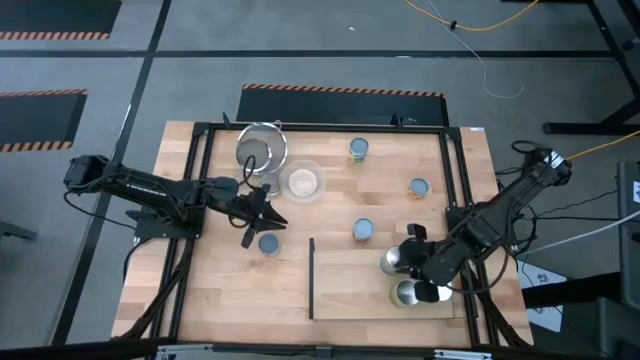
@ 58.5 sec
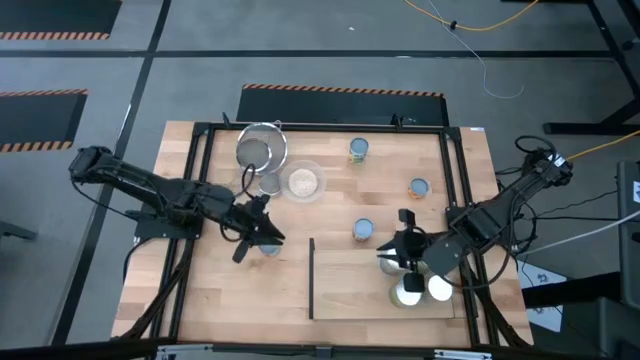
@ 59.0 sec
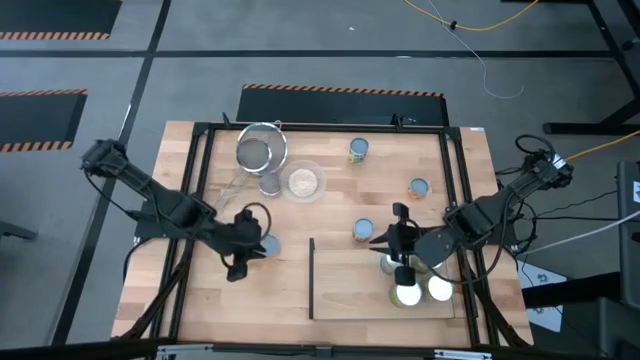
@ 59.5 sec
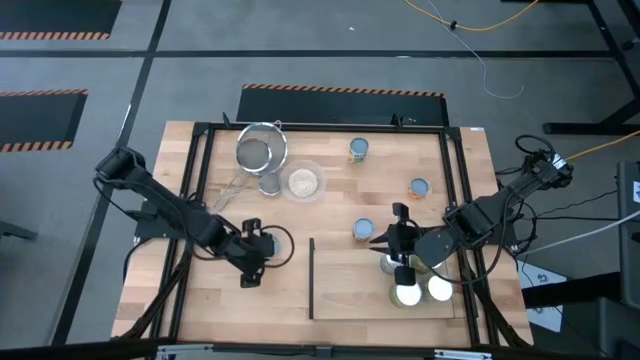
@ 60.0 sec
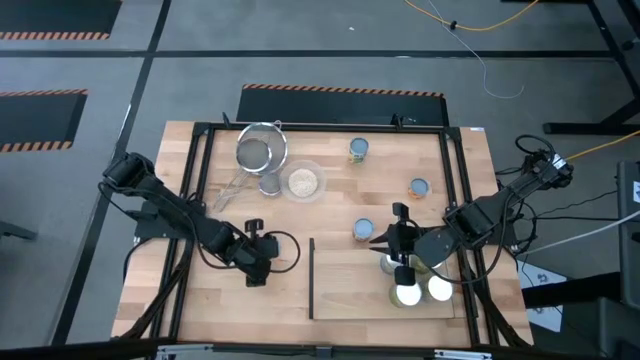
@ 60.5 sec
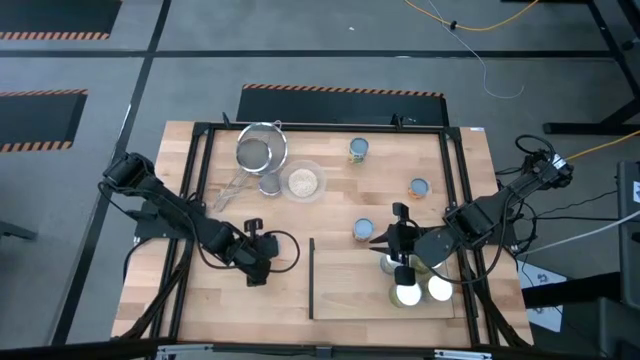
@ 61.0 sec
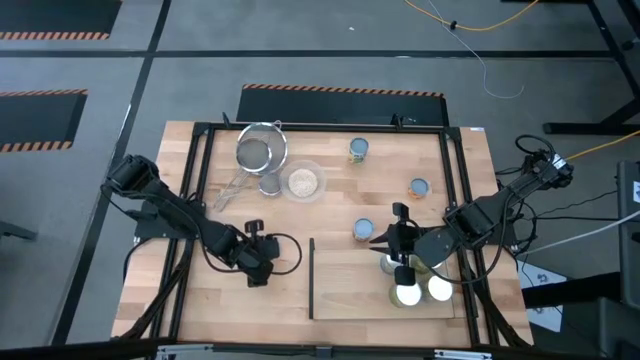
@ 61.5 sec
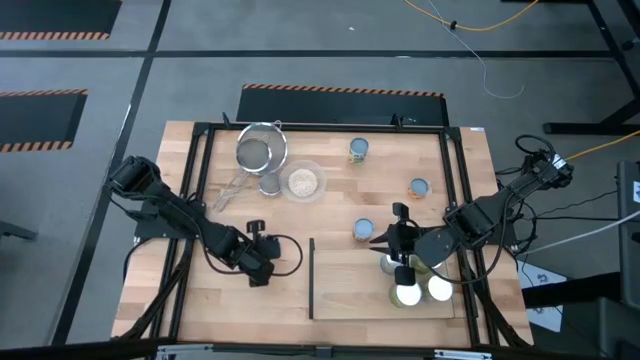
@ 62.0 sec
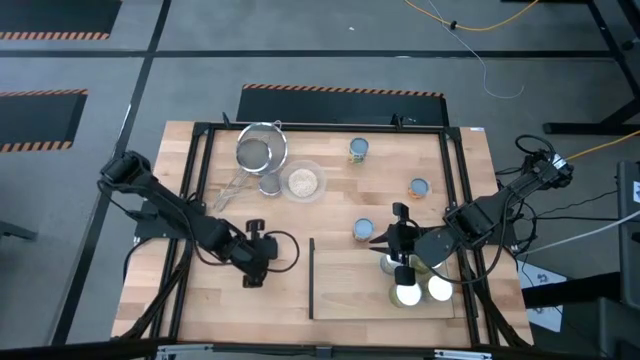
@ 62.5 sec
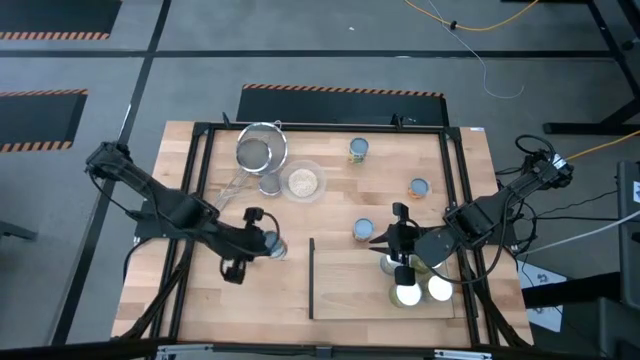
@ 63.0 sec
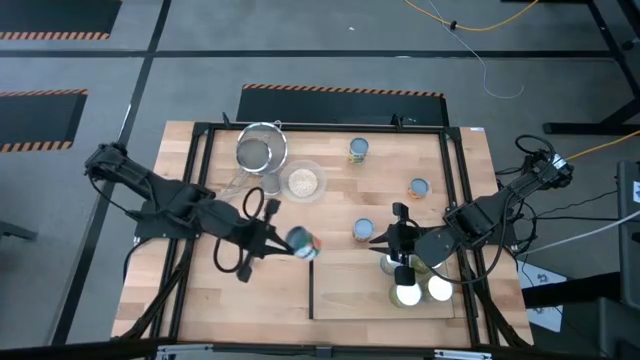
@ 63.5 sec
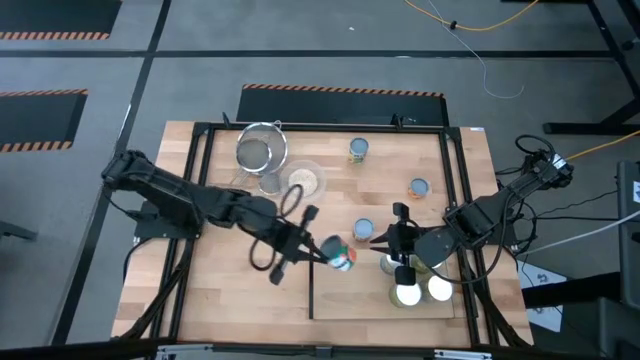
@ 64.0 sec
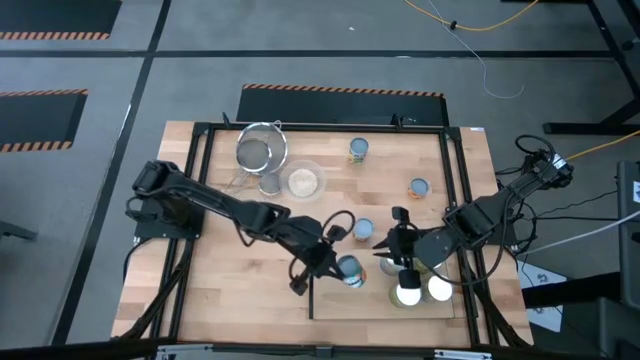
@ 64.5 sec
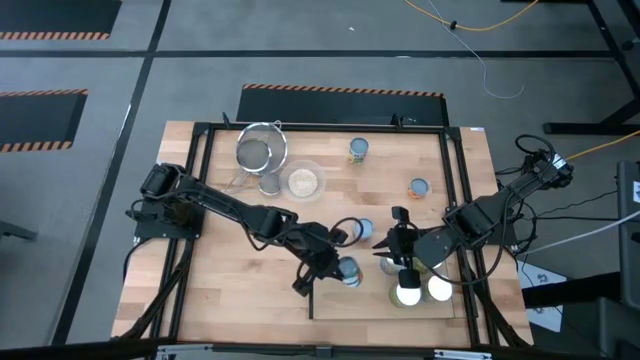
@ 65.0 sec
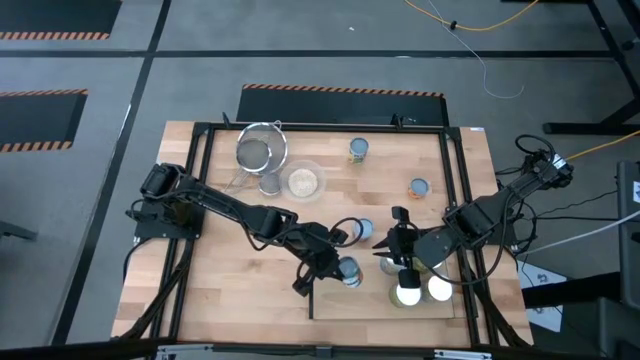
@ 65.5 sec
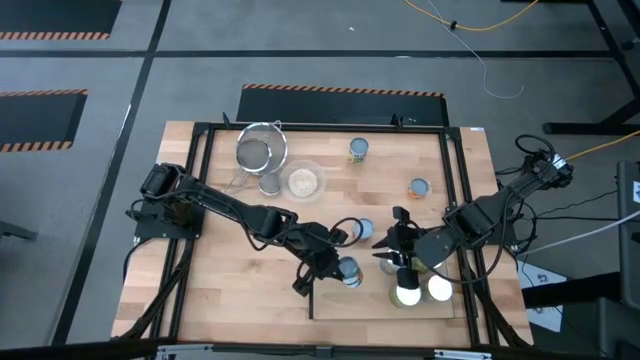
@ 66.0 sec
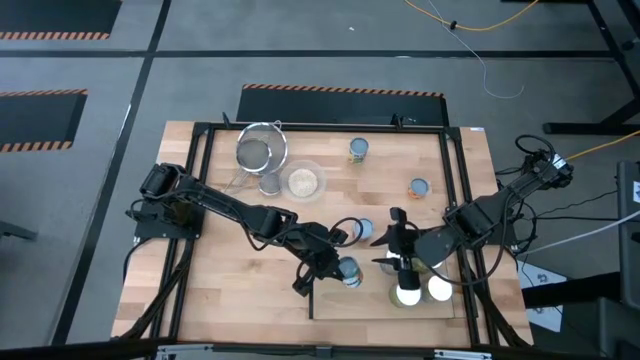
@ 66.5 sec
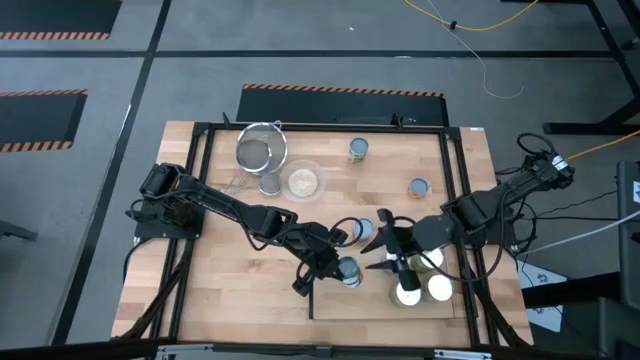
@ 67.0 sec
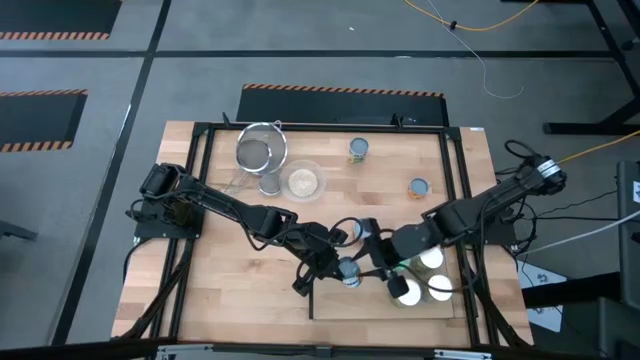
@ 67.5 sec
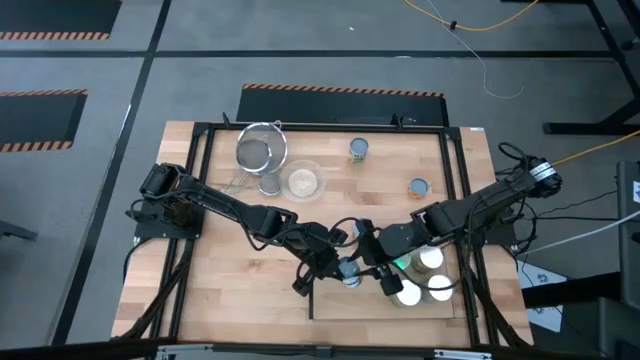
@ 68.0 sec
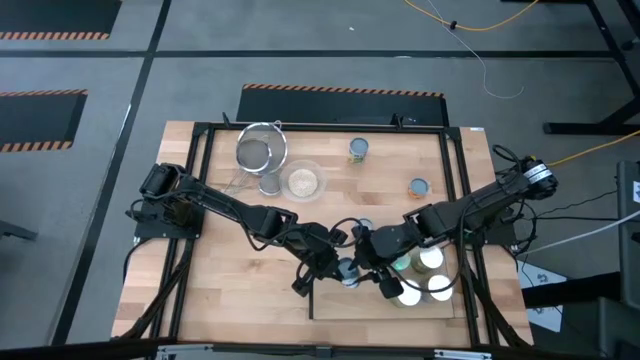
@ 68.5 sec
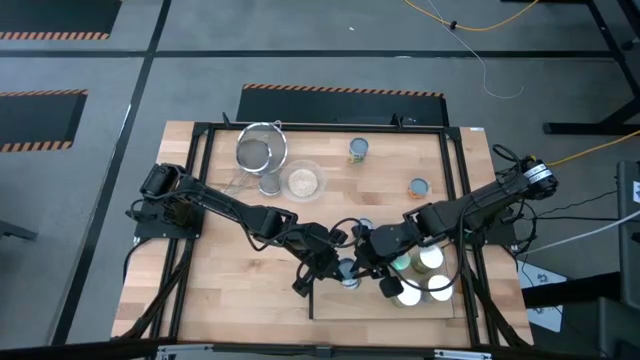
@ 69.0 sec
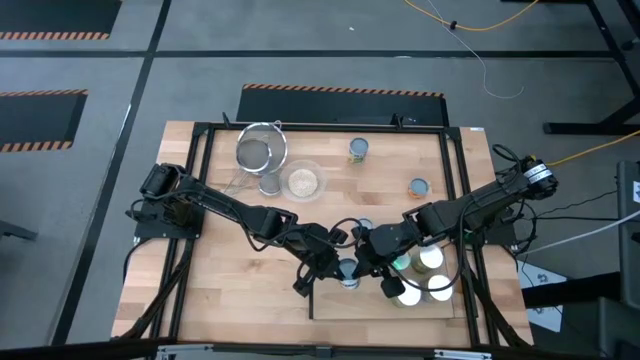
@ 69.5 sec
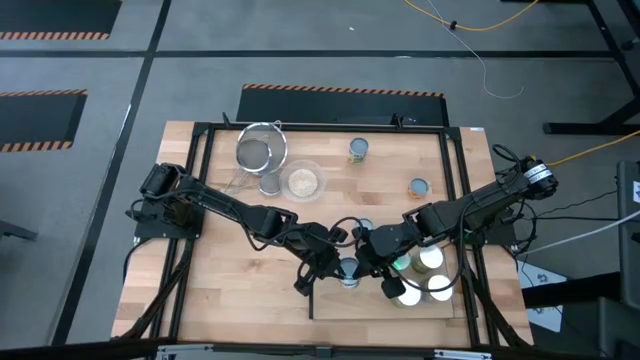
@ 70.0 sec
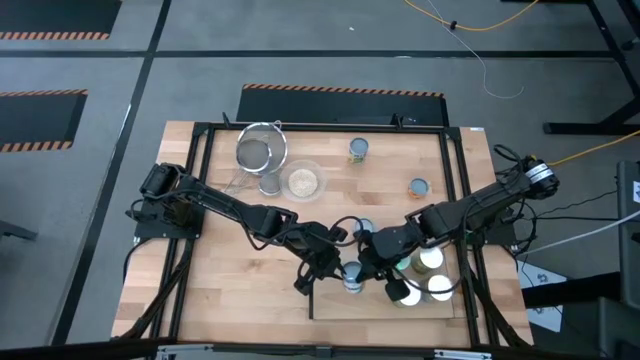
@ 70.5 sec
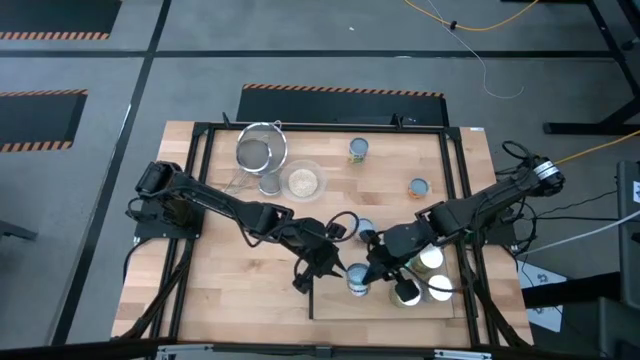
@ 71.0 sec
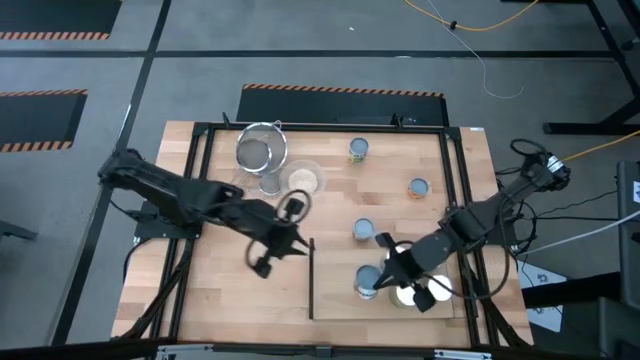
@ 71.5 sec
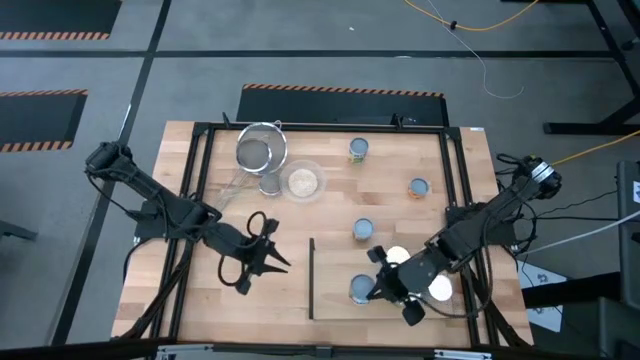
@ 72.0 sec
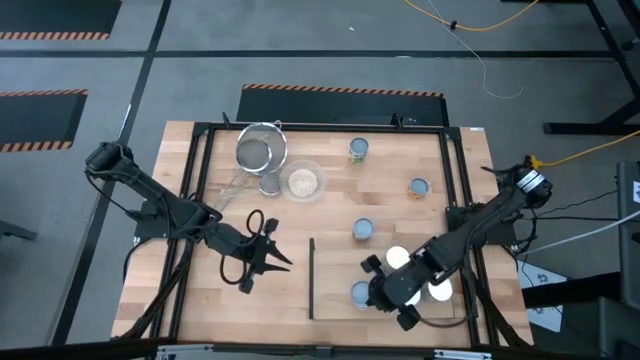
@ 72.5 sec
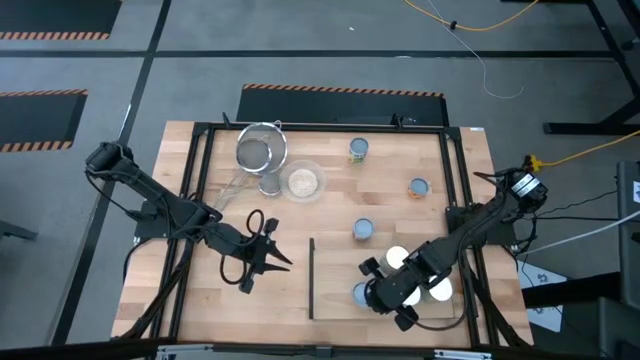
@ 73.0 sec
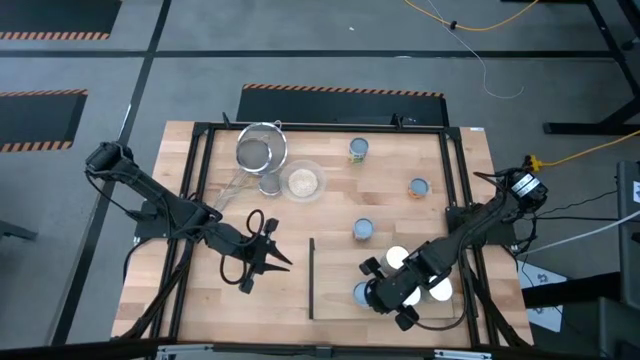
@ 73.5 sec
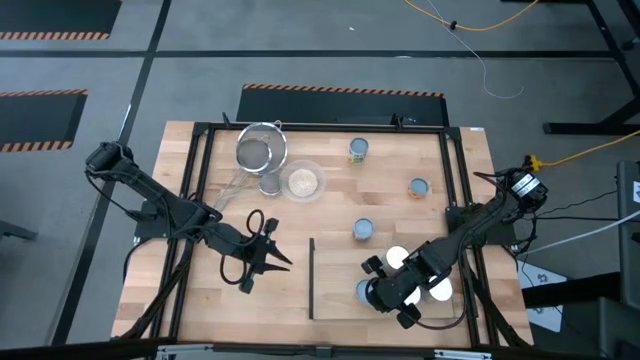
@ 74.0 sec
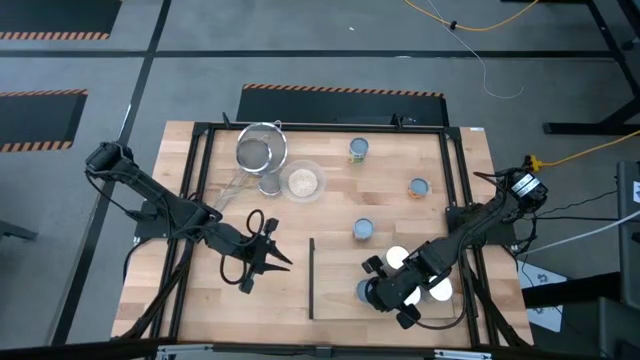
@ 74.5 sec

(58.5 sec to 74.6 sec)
Task: Pick and place cans onto a shelf
Put the orange can on the shelf

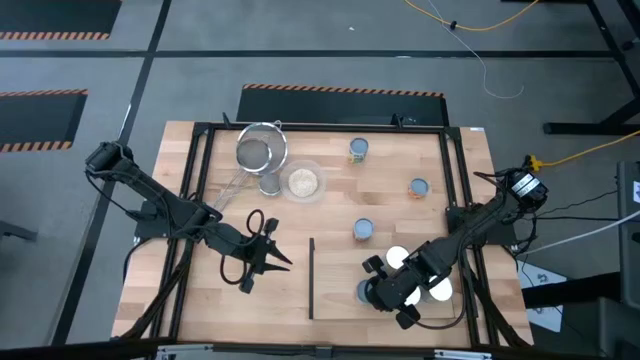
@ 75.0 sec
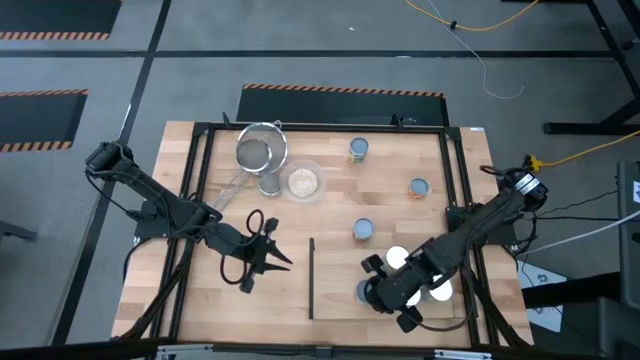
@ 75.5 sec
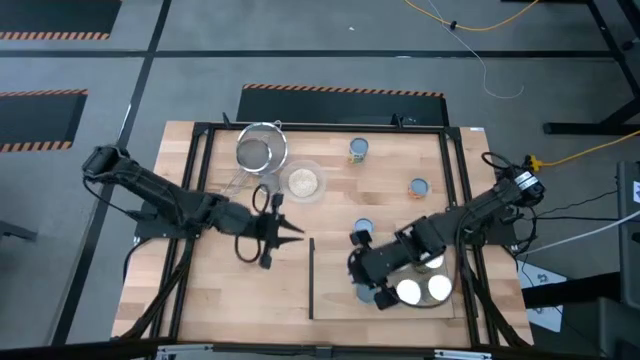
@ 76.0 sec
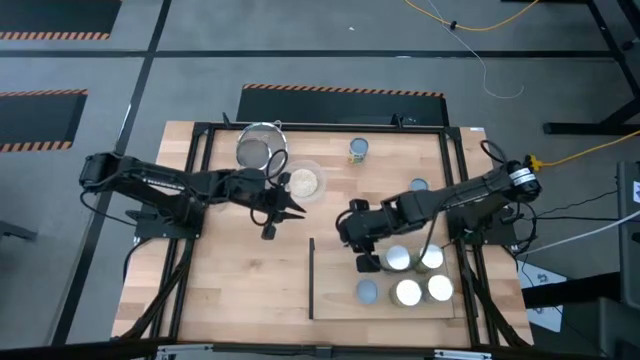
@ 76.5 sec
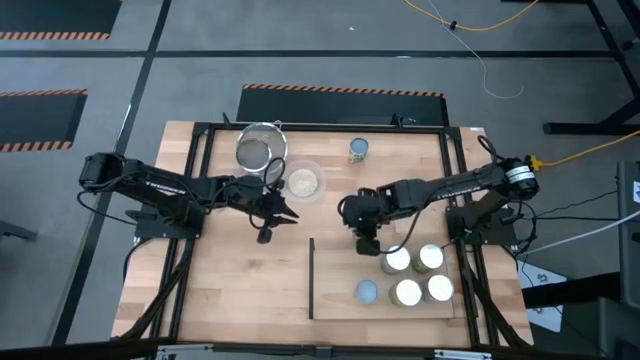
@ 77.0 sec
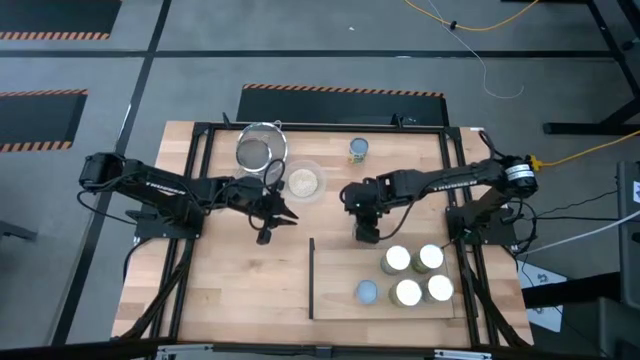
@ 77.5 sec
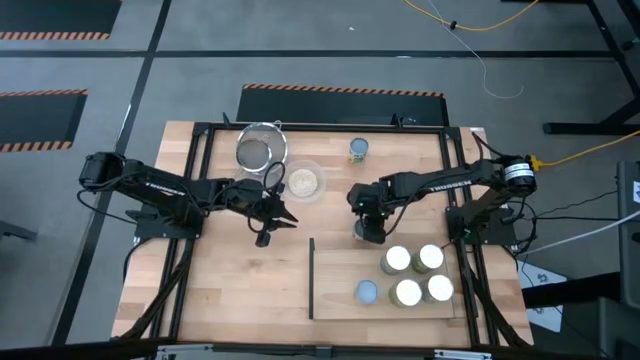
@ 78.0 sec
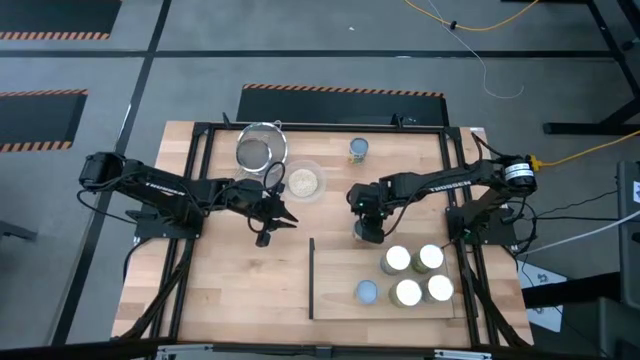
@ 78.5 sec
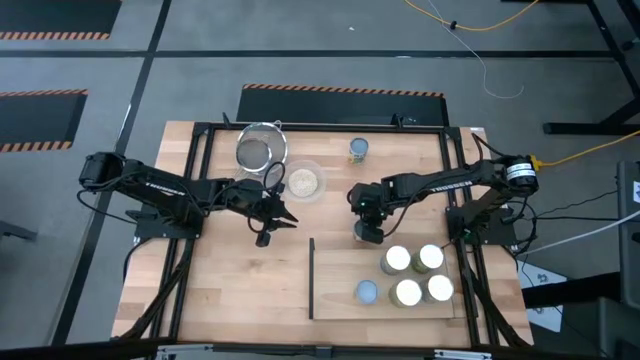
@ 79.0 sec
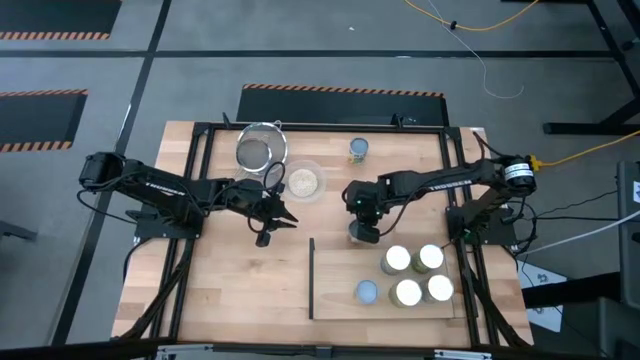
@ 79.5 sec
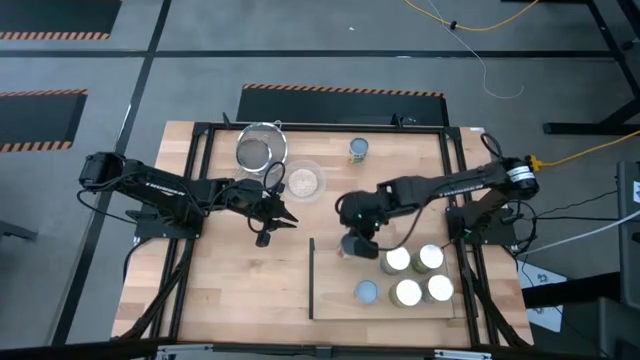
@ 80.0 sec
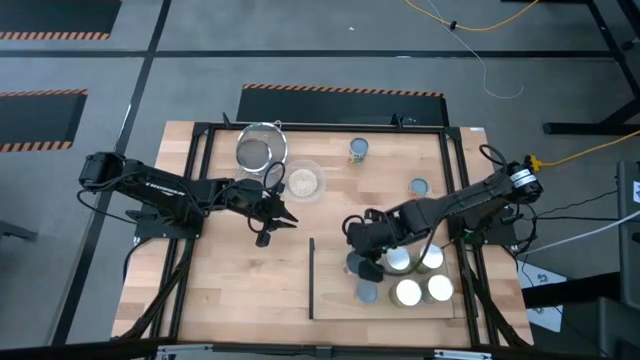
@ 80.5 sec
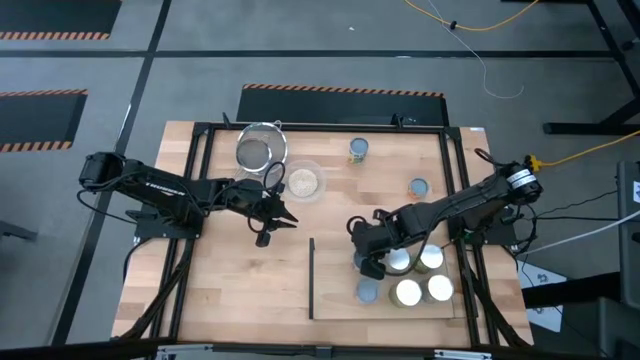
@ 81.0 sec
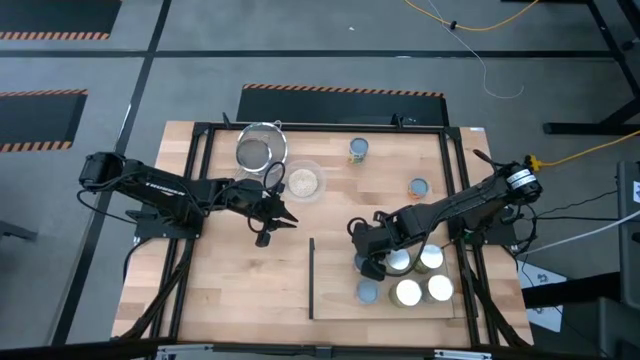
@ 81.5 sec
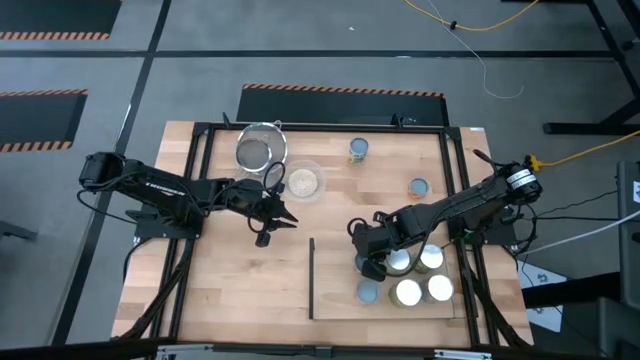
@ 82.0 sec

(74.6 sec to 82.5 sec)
Put the red can on the shelf aligned with the other orange can
